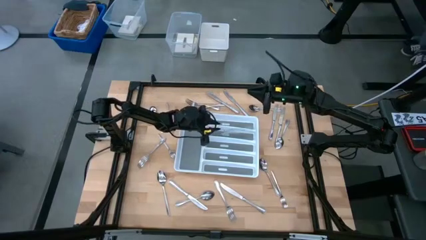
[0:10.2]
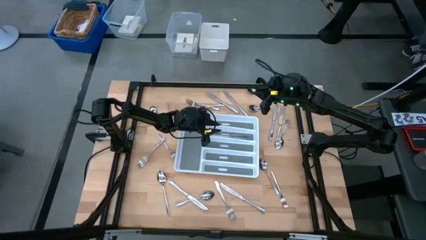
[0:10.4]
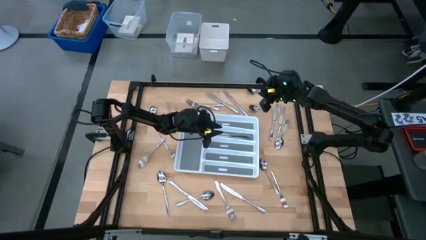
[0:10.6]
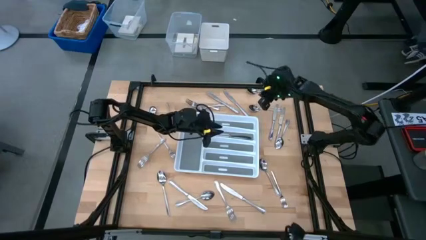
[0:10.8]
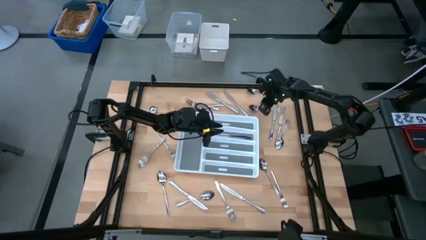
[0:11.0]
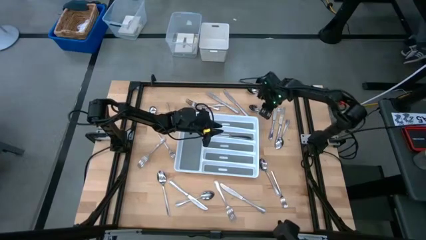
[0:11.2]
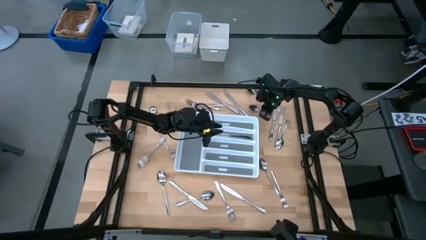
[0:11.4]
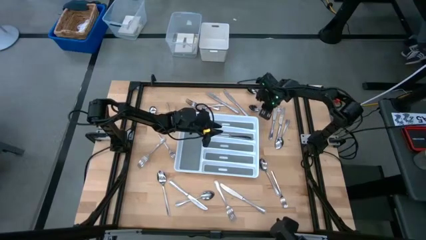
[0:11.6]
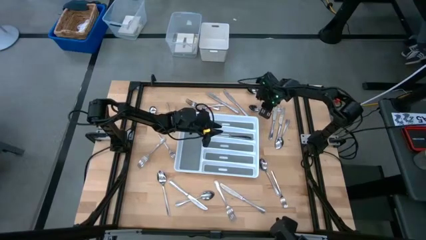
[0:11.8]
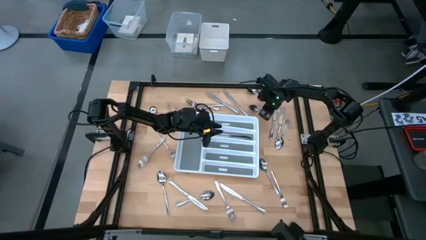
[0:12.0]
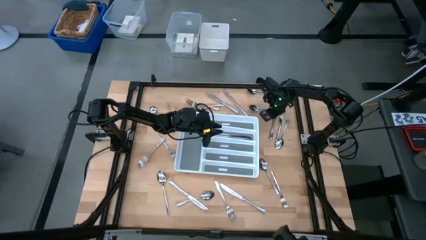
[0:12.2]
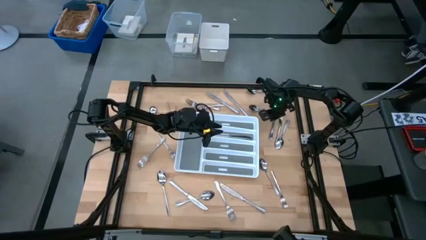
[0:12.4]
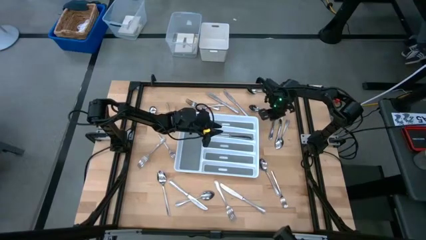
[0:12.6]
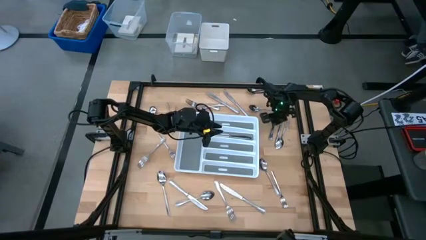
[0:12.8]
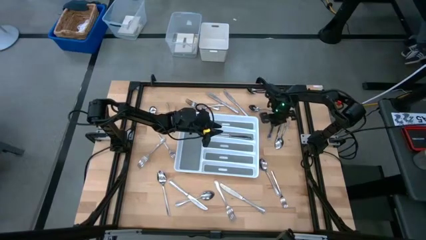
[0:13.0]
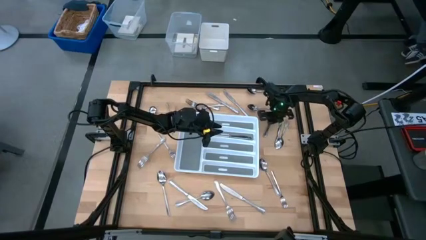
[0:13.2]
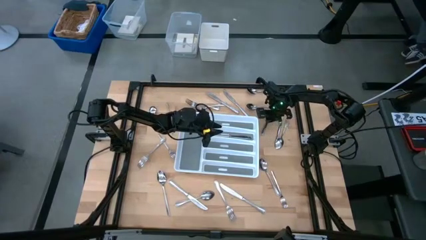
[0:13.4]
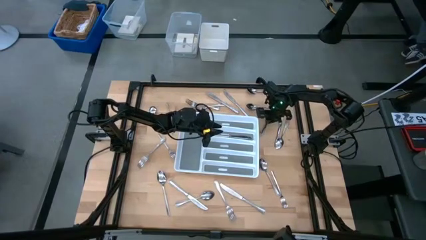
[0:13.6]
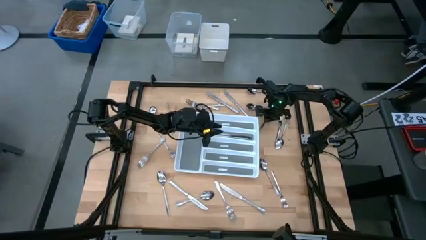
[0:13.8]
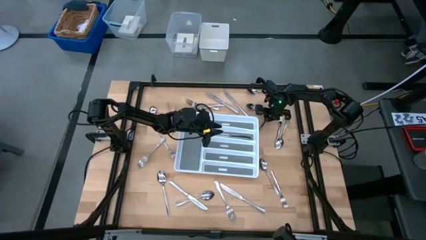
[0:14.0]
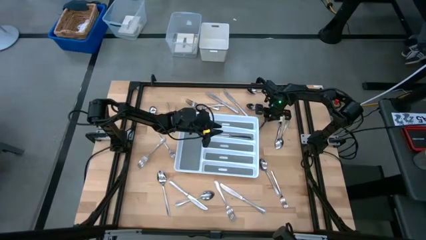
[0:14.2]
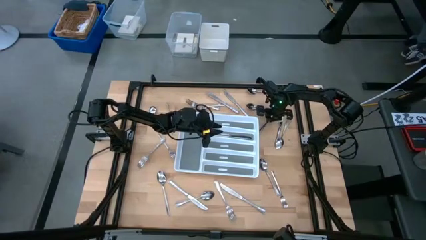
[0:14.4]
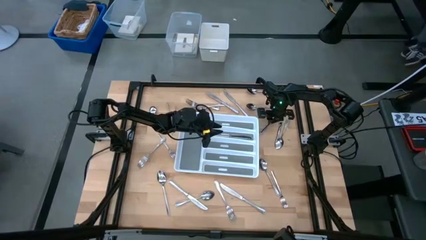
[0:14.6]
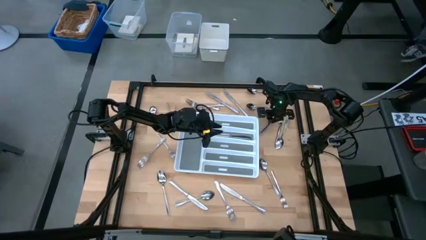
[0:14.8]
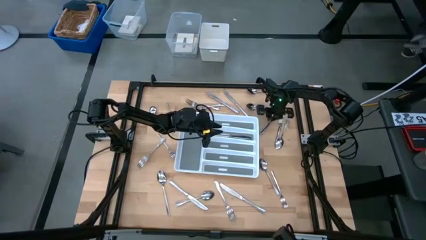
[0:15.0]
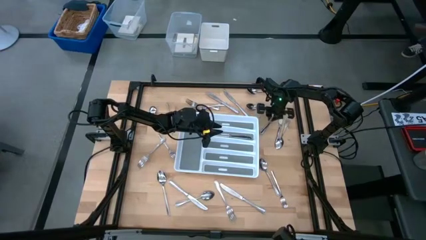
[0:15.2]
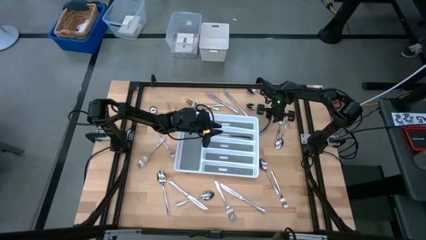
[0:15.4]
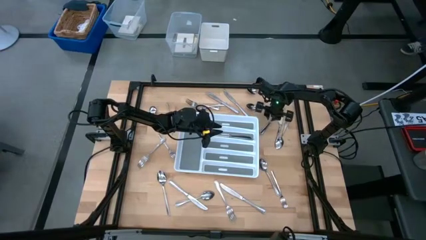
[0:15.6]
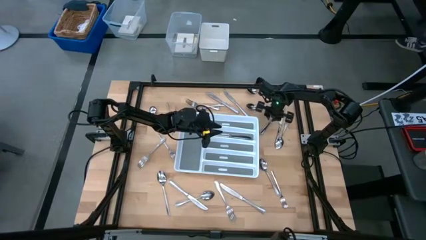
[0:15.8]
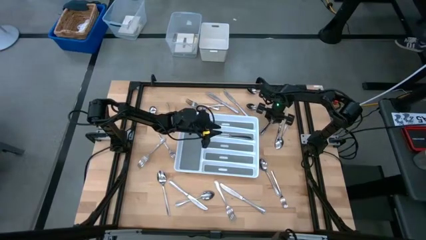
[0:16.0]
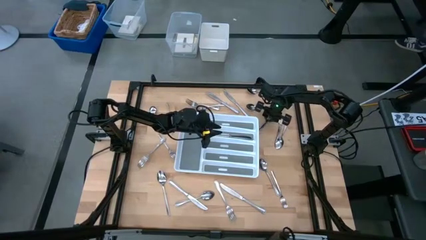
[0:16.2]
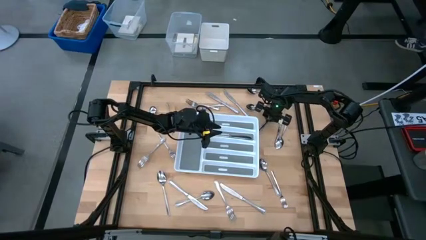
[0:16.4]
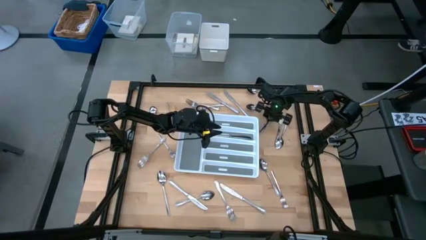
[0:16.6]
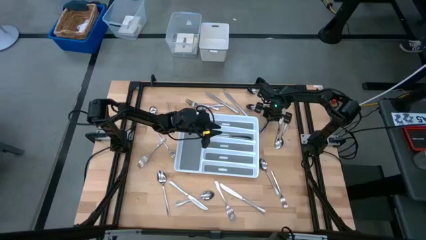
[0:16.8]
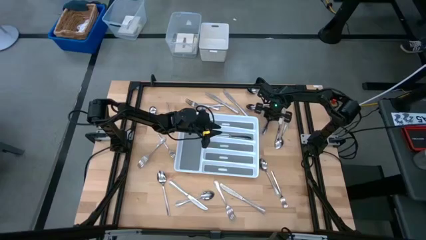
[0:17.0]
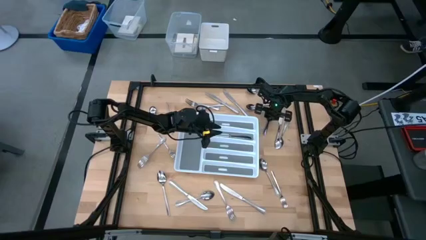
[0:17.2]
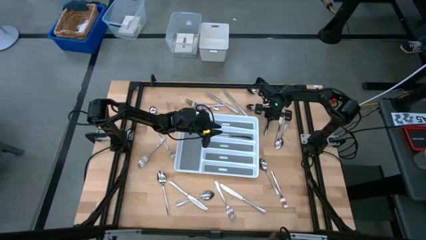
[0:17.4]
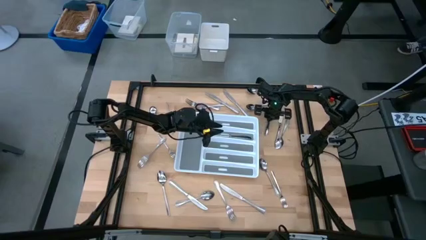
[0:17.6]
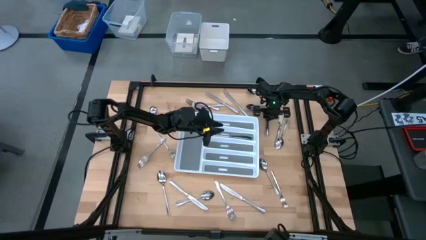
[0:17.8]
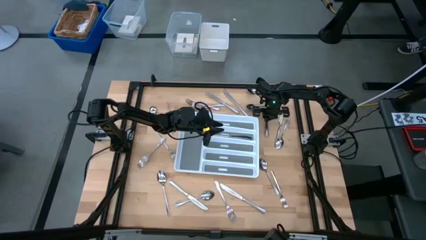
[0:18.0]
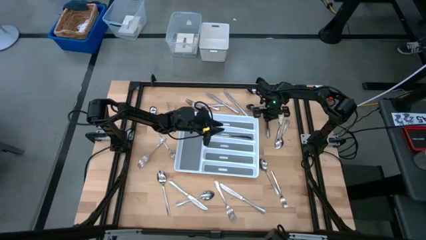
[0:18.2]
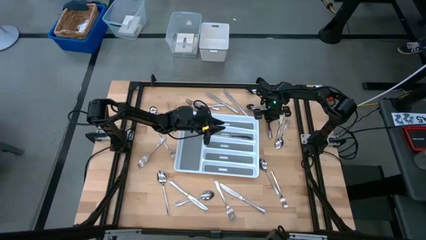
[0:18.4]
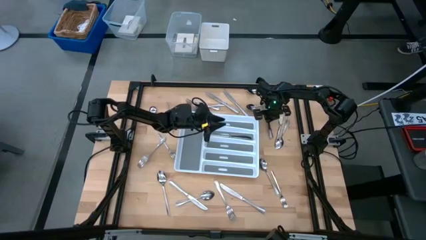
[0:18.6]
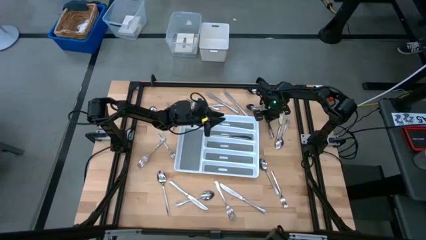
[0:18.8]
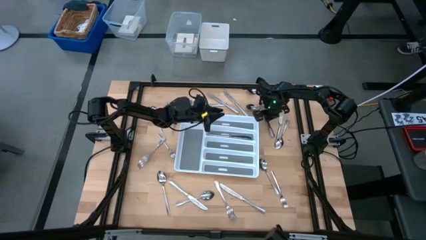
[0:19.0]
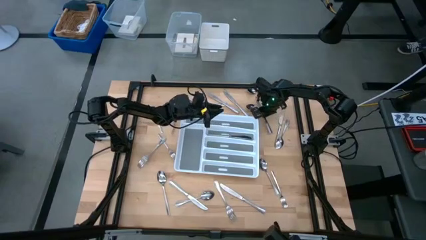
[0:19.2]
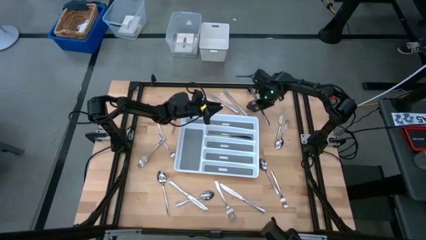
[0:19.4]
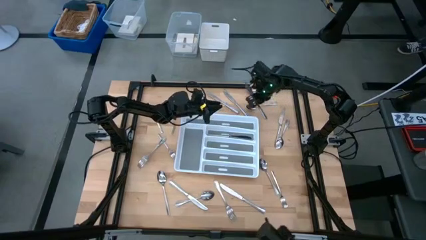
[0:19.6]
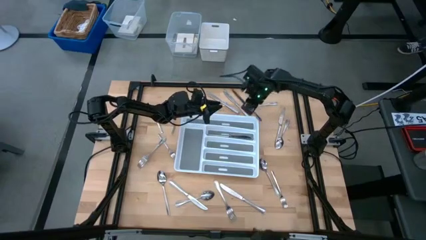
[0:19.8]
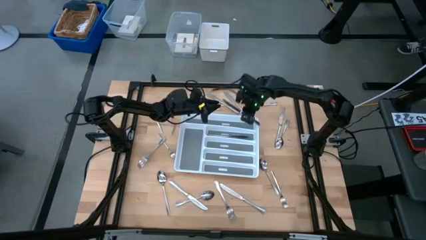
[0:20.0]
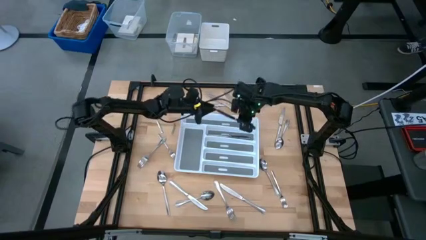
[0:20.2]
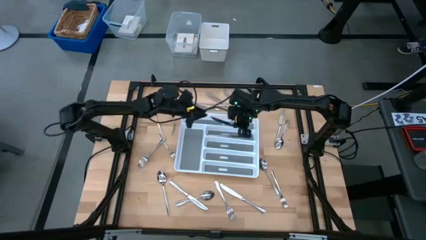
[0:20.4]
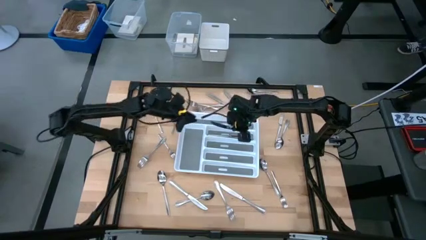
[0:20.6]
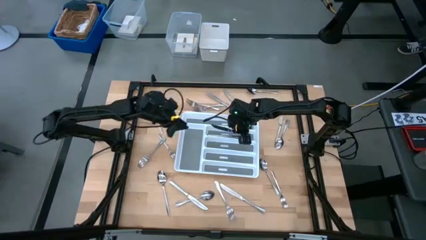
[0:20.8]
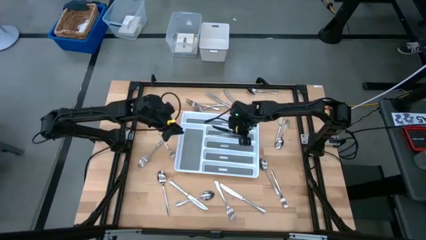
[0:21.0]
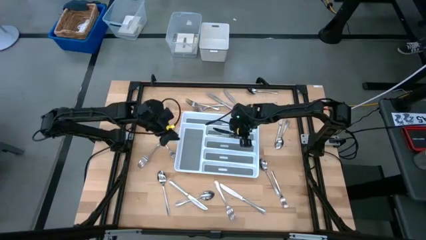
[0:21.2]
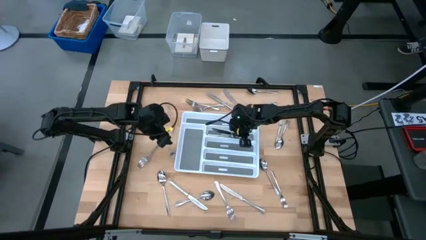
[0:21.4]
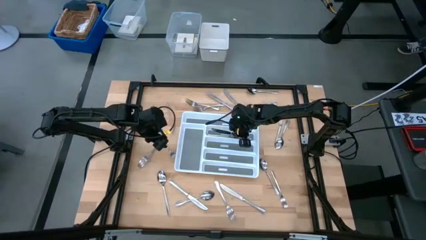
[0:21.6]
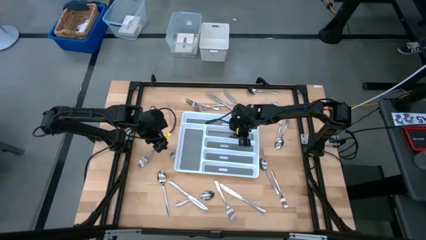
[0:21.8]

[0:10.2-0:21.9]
Task: Sort silverware
Put the knife into the organizer tray

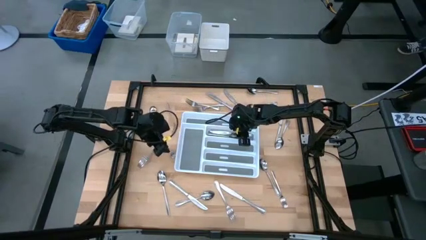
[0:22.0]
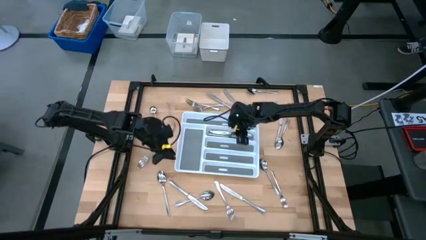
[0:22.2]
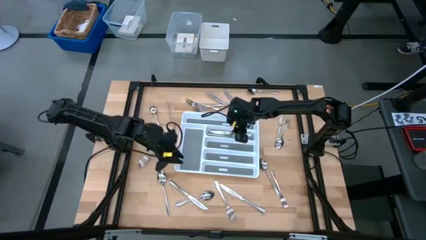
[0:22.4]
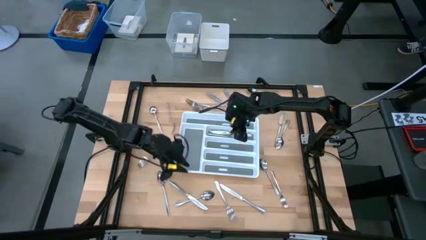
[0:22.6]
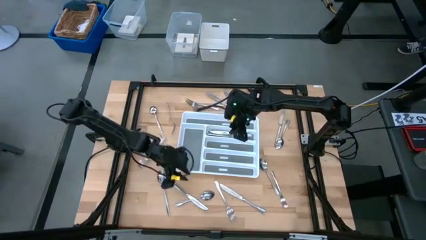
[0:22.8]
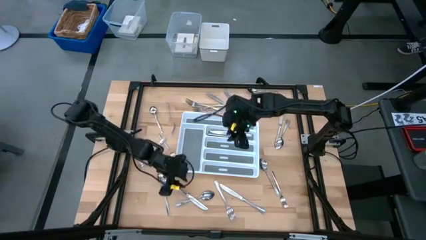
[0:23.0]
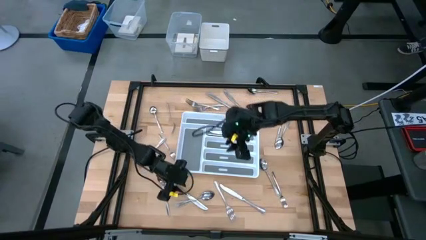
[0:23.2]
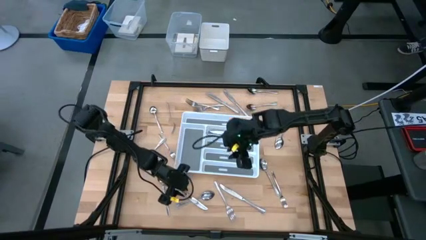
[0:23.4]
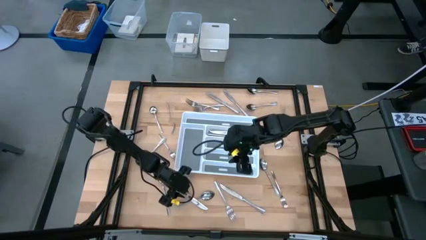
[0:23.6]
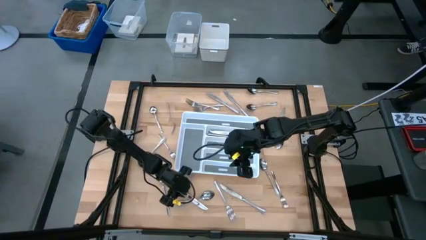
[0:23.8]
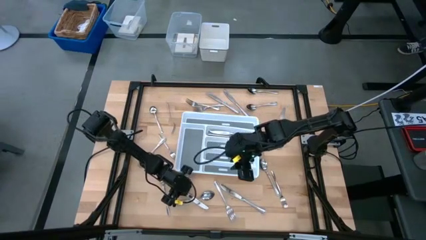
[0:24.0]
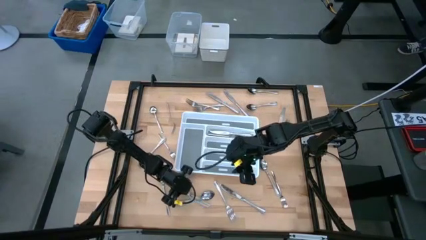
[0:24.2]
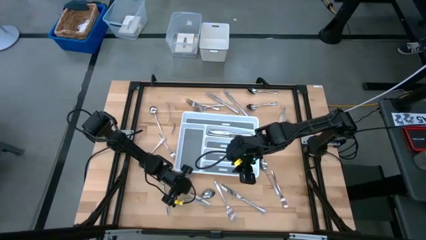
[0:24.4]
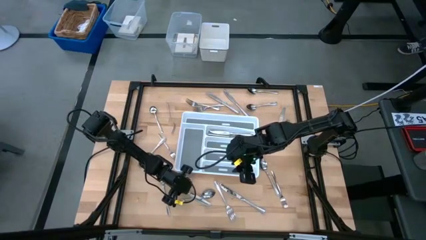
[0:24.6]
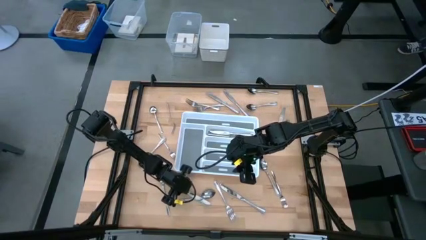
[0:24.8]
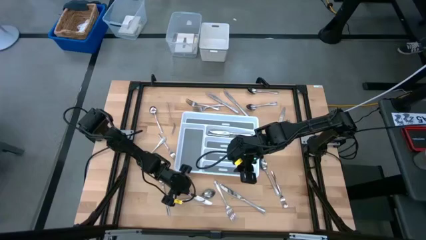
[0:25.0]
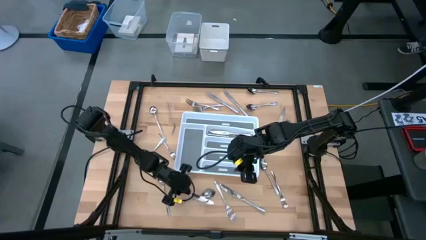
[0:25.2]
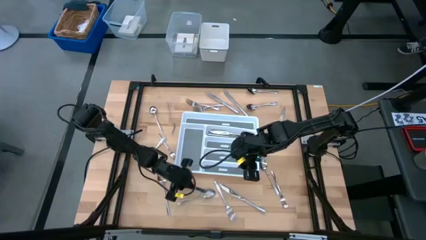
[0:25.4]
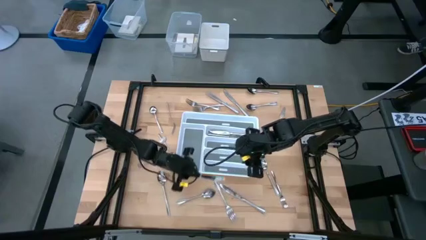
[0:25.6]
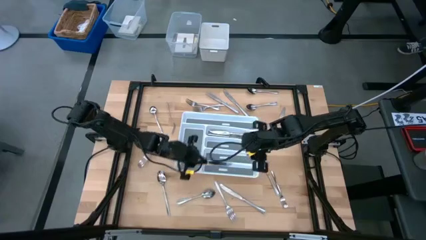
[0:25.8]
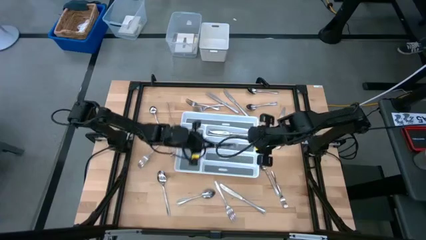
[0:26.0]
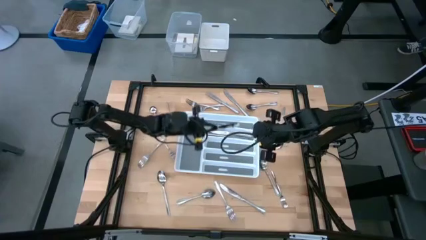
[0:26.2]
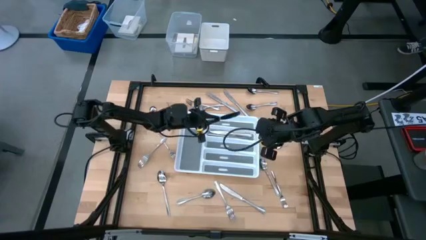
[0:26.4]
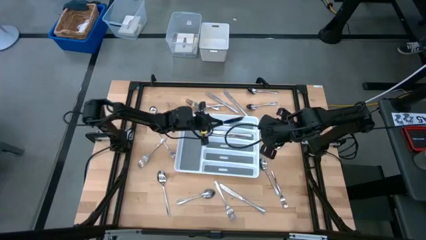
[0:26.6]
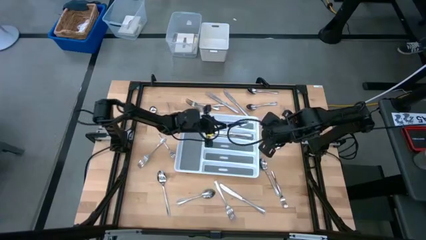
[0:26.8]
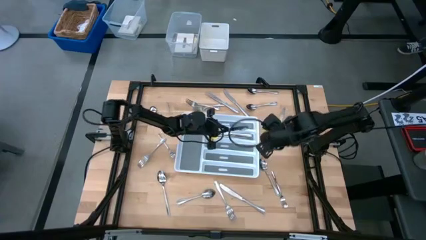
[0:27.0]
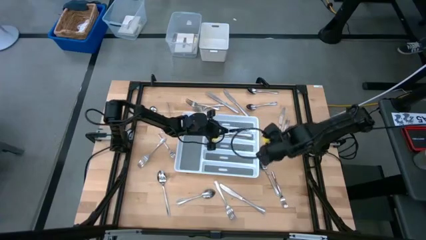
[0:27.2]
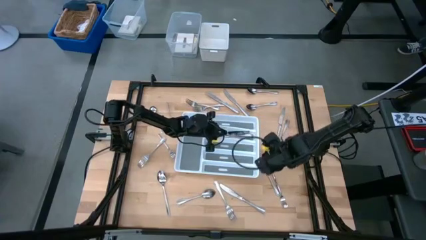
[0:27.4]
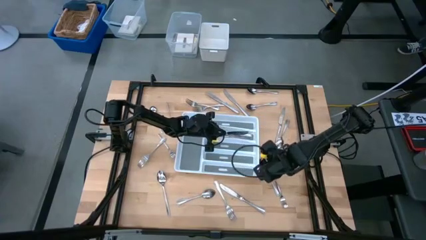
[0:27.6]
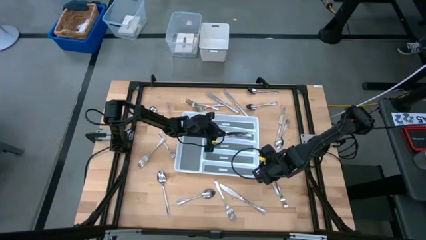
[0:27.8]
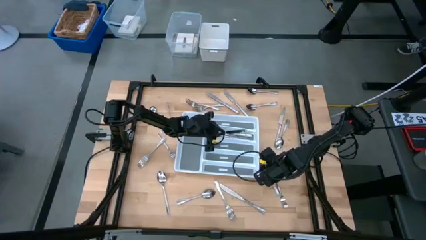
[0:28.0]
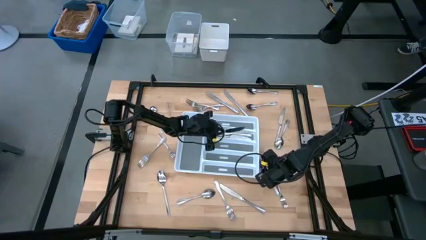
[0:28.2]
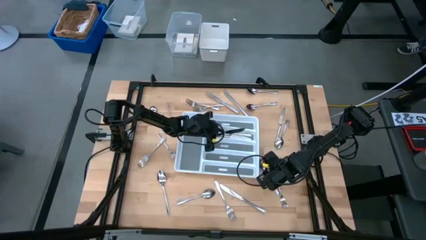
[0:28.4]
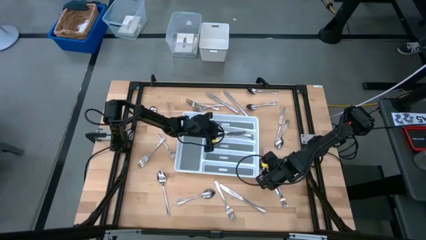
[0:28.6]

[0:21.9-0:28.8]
Put the knife into the organizer tray
